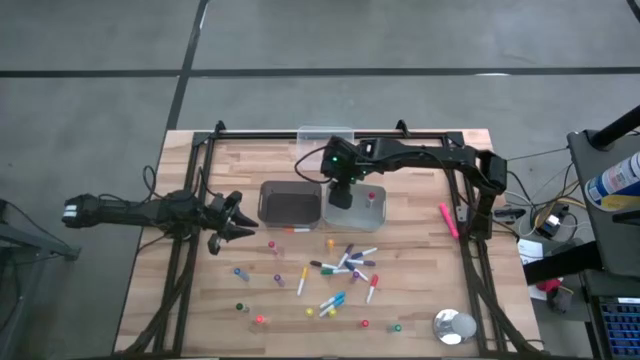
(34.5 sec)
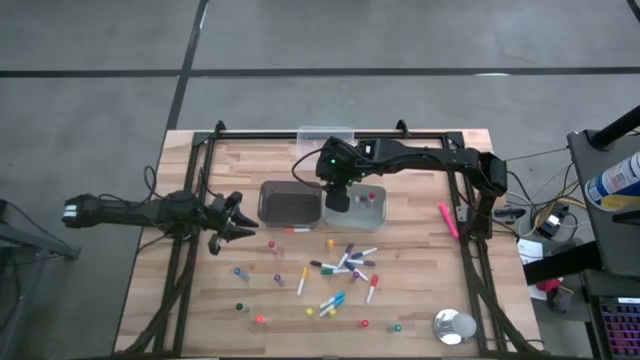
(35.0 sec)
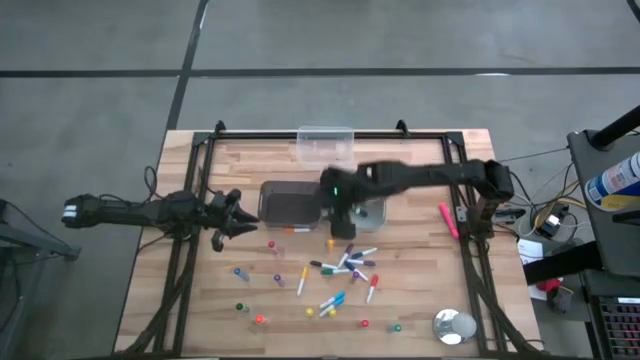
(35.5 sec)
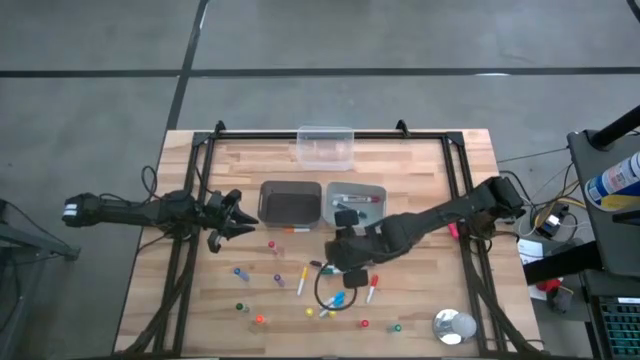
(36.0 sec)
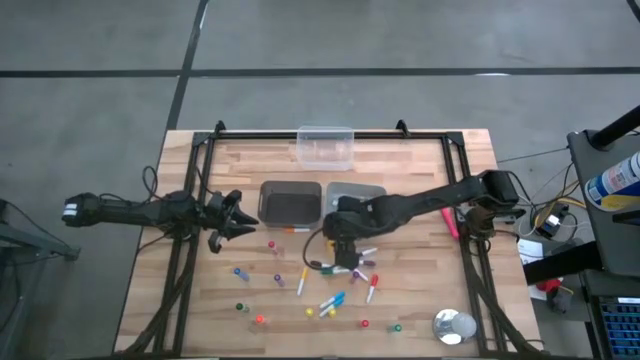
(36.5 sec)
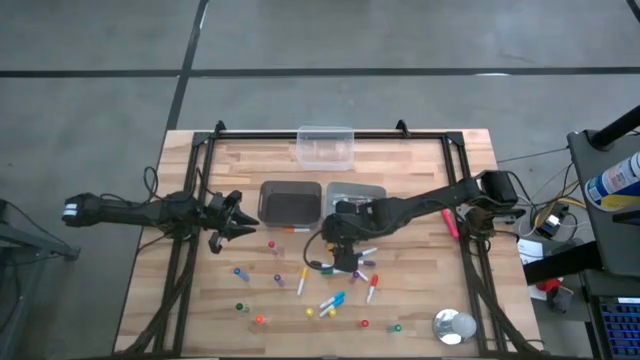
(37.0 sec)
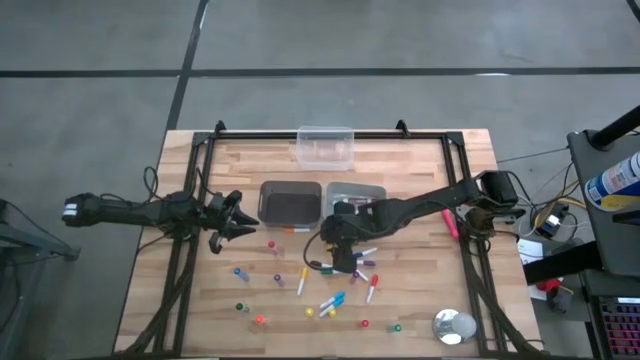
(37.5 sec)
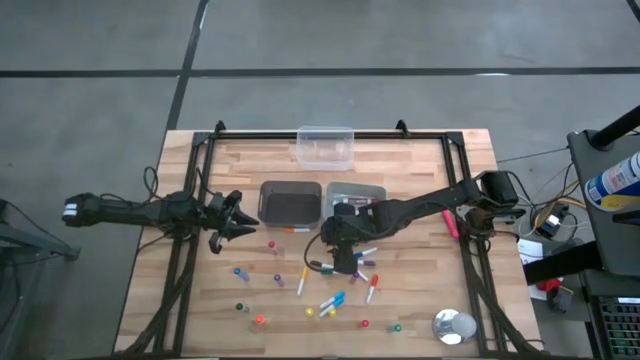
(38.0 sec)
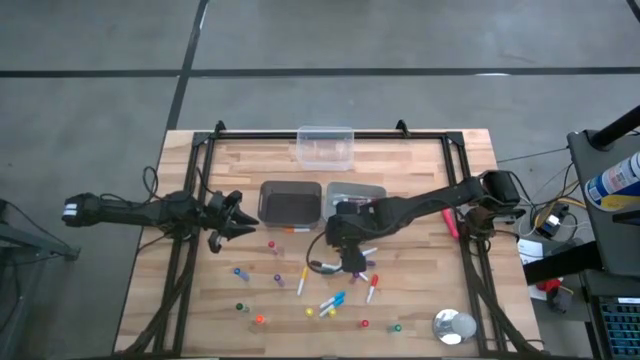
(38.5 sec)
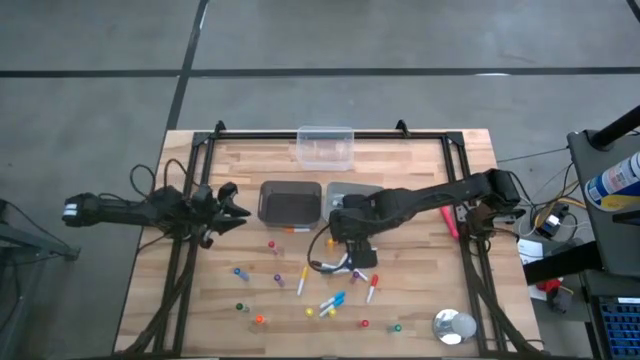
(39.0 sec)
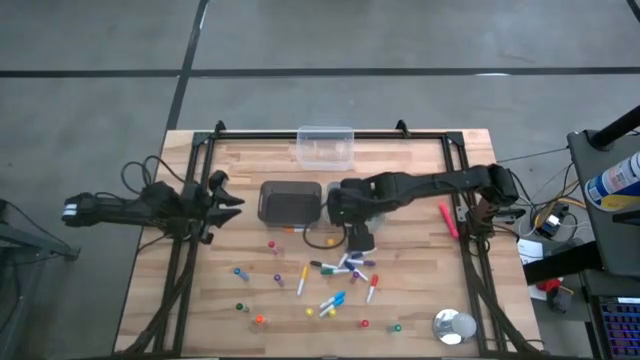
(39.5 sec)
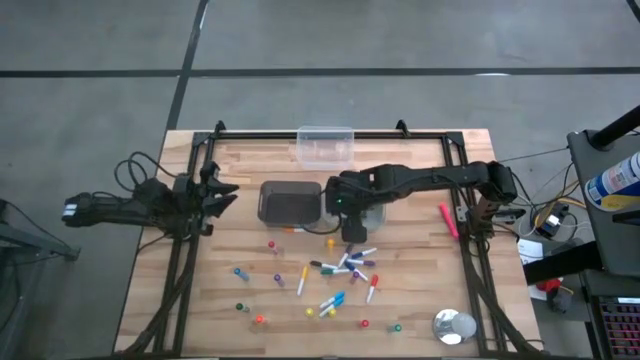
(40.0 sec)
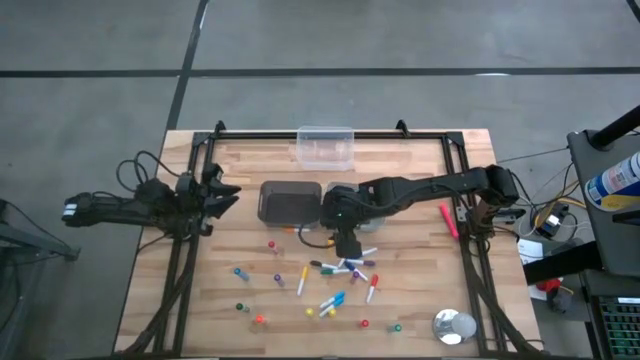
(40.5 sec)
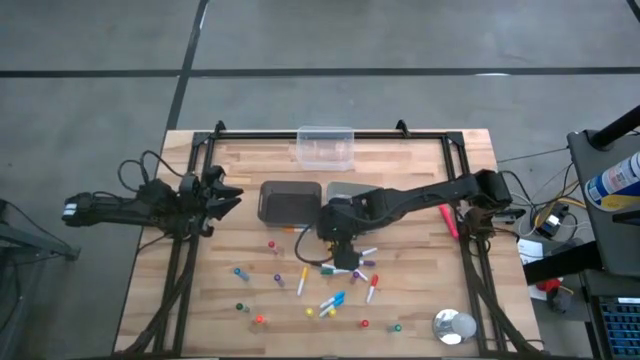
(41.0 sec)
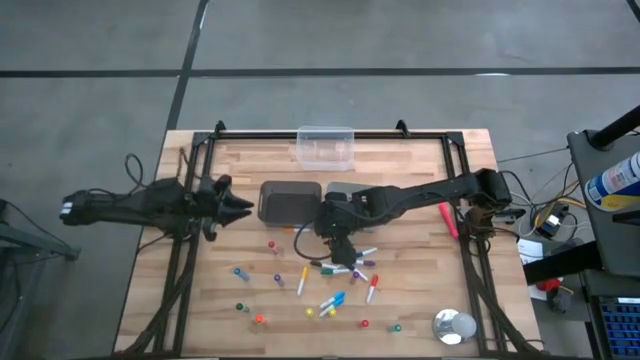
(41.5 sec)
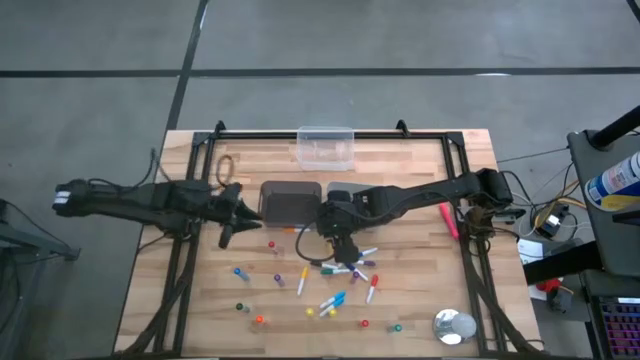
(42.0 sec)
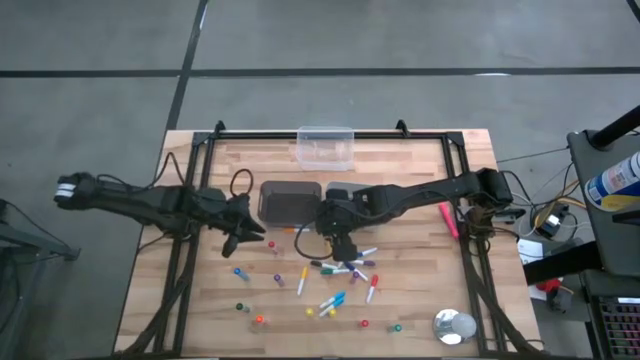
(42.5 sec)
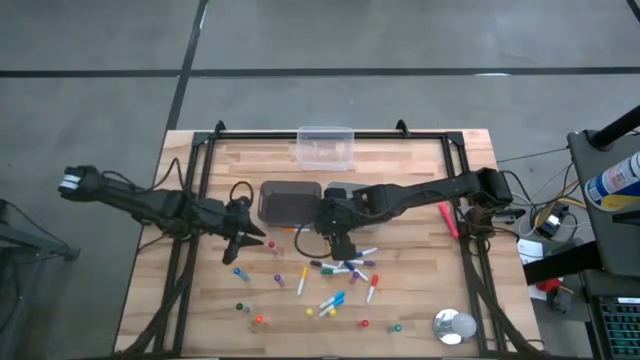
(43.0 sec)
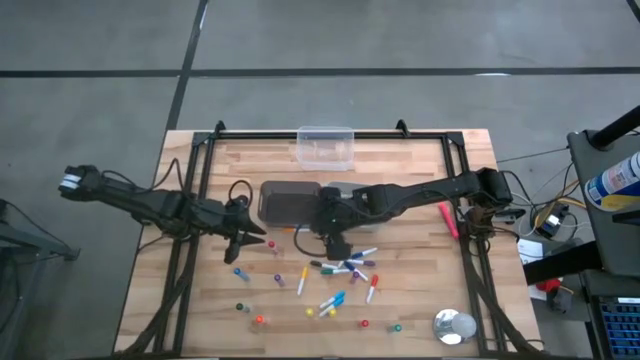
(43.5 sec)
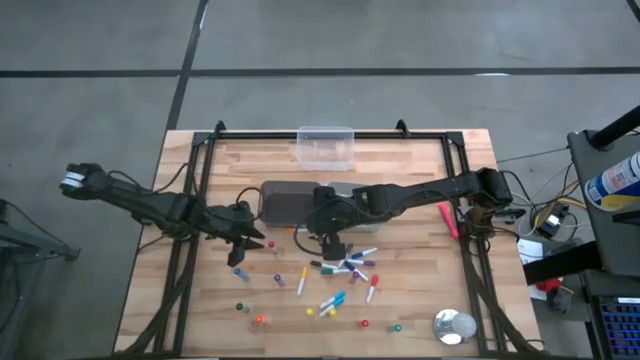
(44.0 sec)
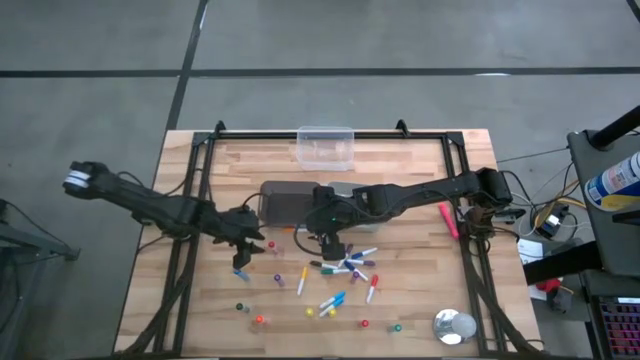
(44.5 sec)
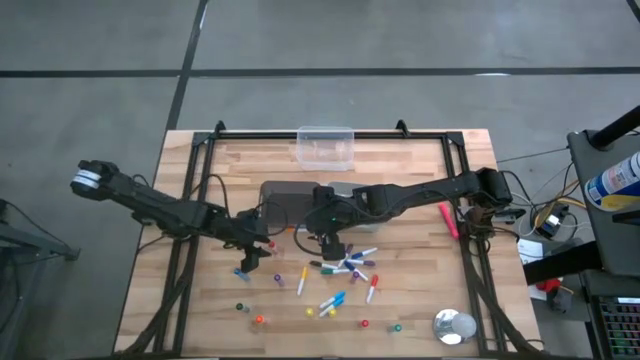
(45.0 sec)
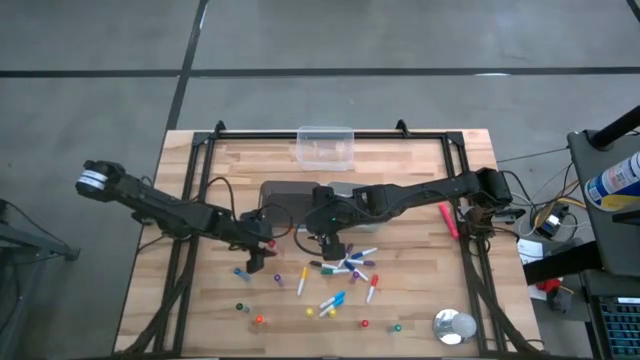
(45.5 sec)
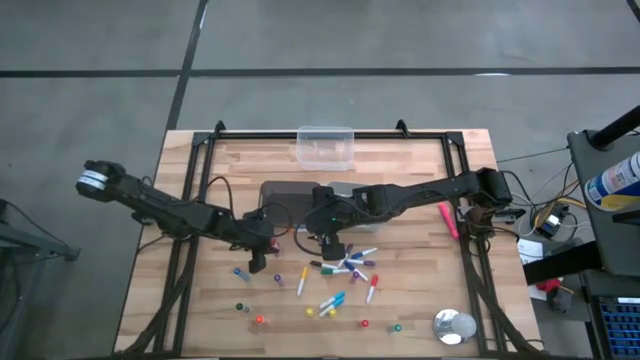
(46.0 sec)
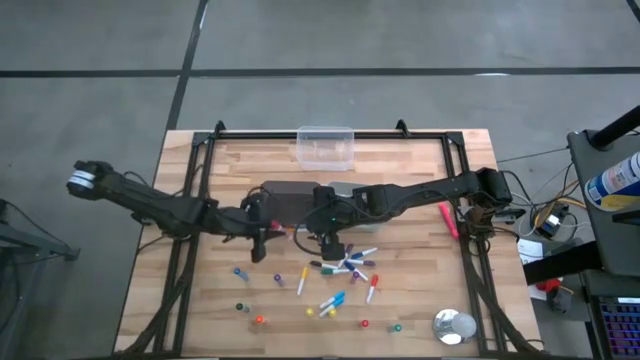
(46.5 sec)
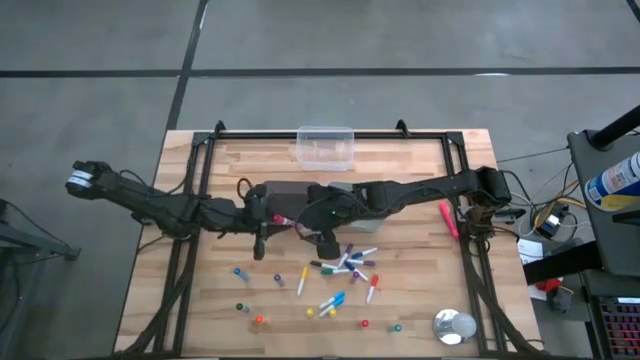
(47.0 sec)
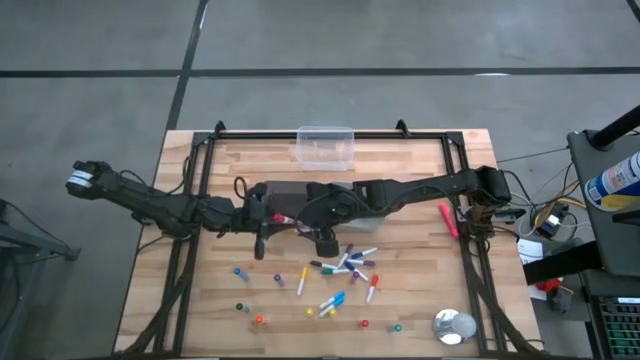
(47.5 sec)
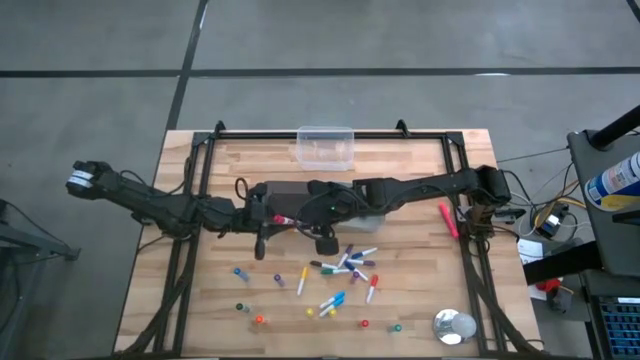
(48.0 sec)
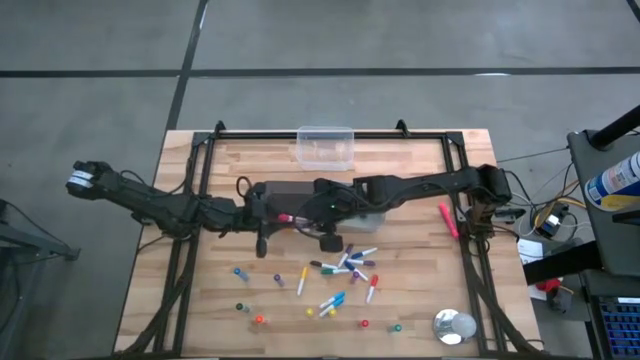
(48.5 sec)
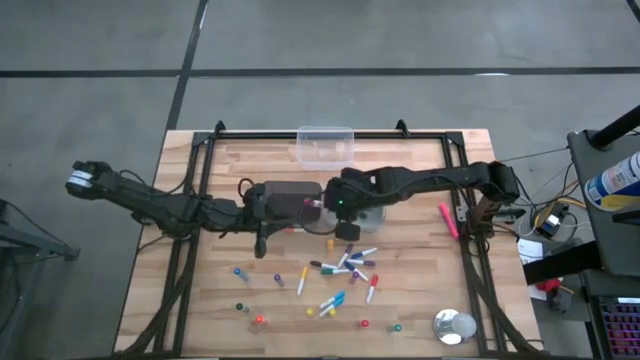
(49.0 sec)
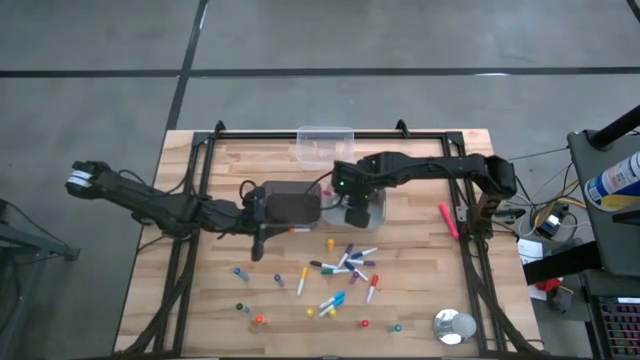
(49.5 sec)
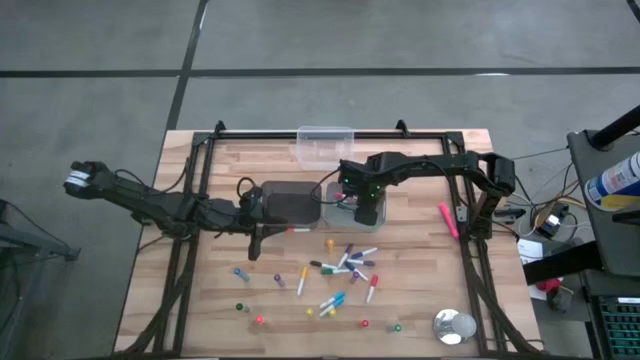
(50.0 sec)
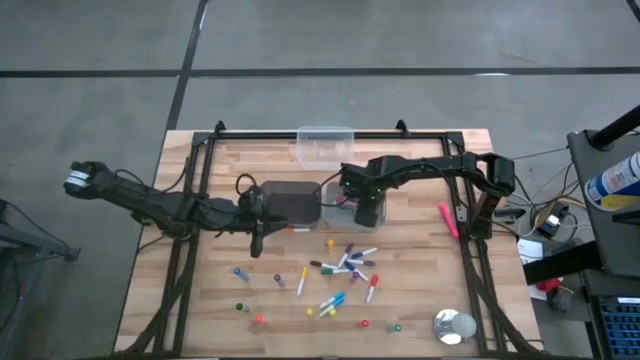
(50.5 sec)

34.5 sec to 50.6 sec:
Task: Pick & Place Markers
Put the large pink marker pen into the white bin
